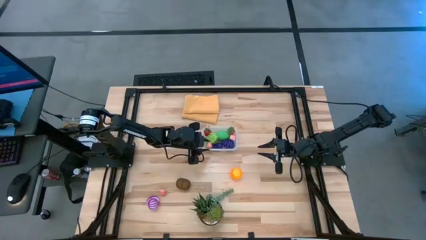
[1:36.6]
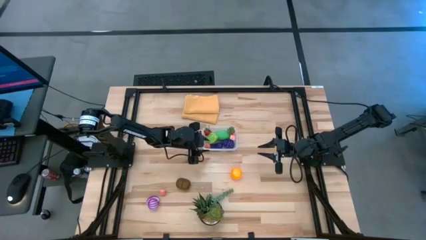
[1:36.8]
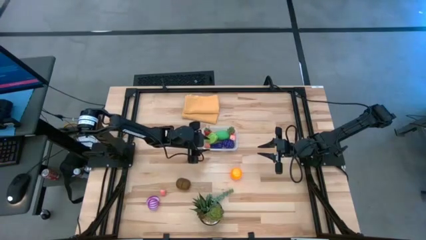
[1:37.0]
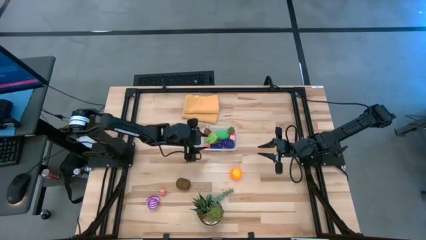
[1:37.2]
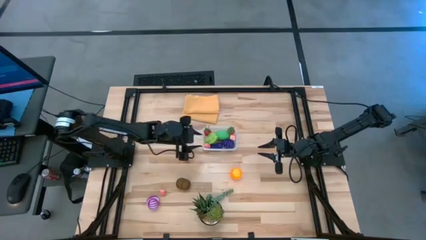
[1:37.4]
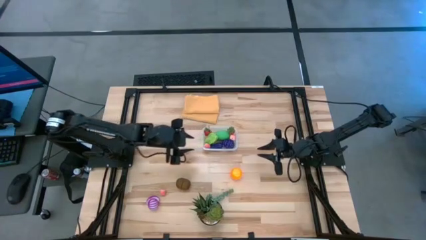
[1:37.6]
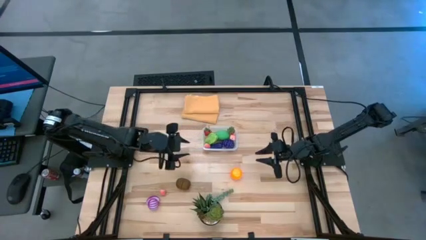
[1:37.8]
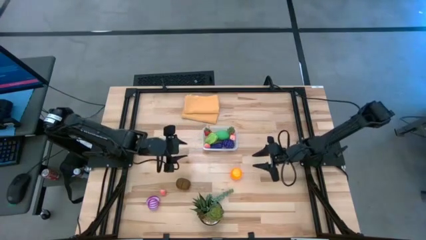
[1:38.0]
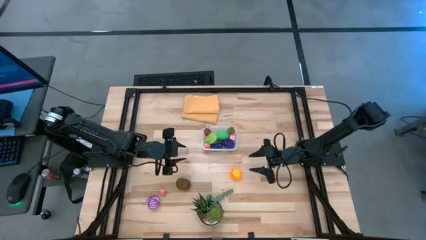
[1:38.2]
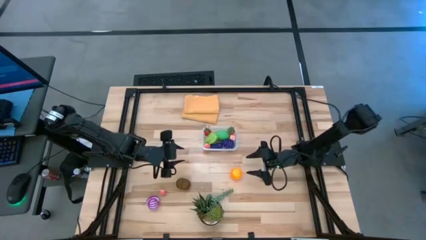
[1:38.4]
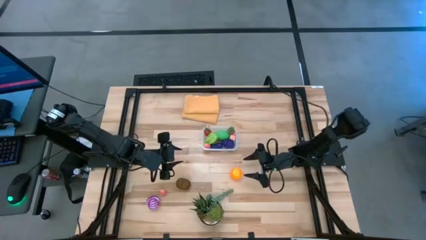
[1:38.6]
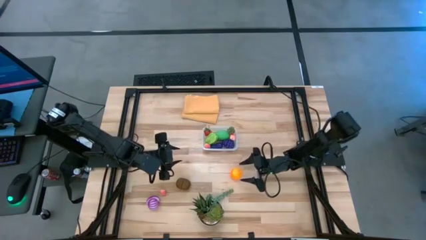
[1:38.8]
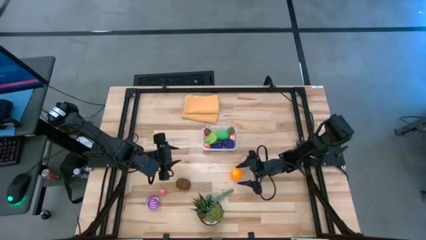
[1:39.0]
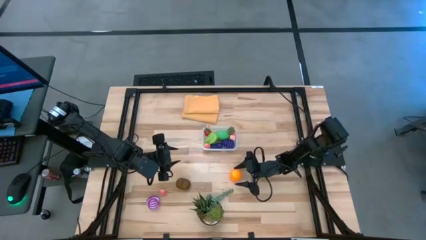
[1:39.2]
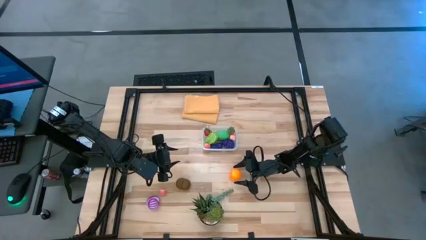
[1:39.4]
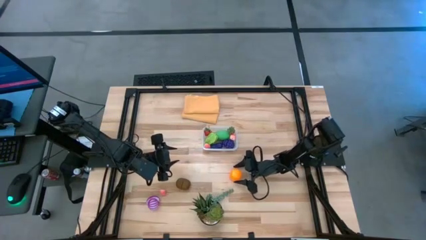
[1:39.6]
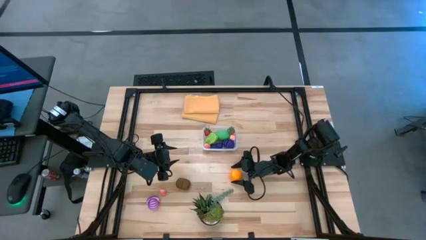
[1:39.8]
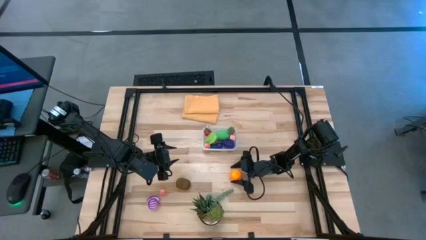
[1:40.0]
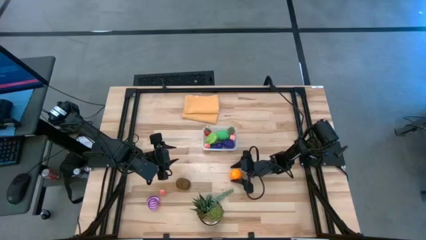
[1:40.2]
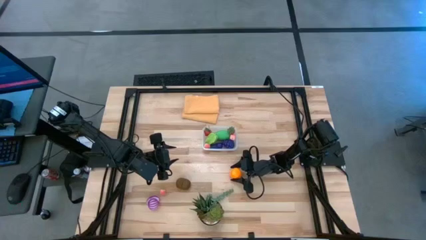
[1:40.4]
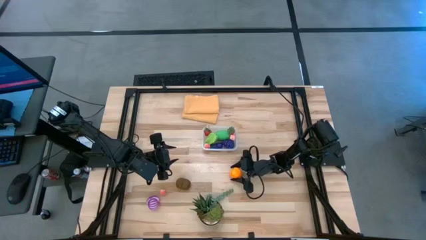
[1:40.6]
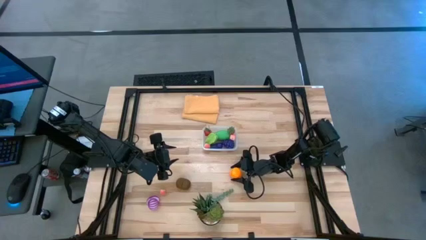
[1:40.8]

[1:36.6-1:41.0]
Task: Pick and placing Produce into tupperware
Put the orange into the transparent container

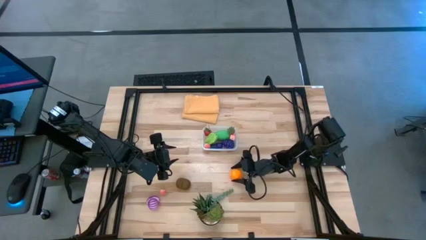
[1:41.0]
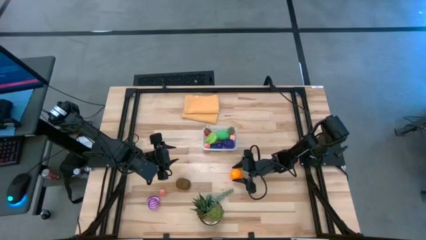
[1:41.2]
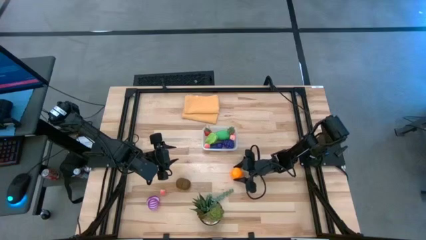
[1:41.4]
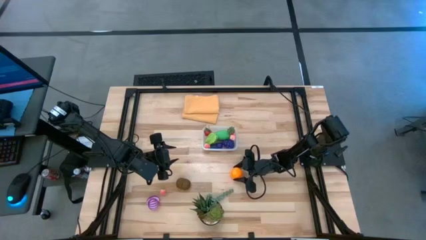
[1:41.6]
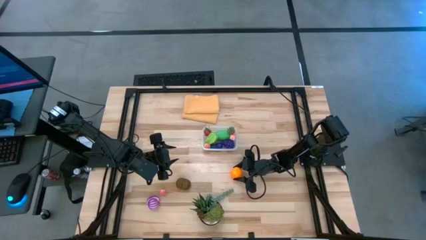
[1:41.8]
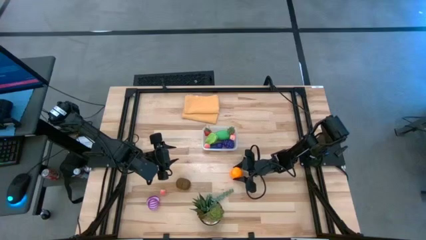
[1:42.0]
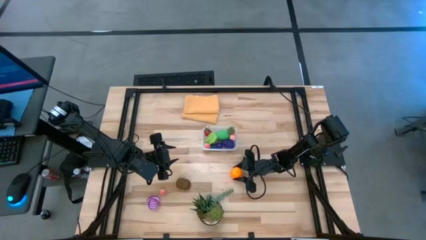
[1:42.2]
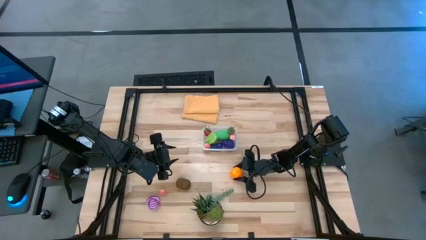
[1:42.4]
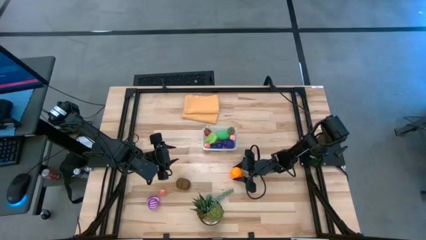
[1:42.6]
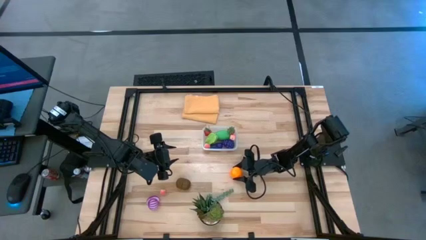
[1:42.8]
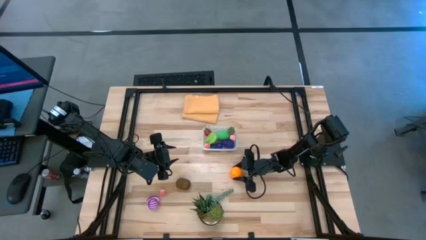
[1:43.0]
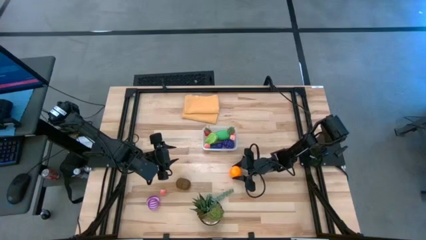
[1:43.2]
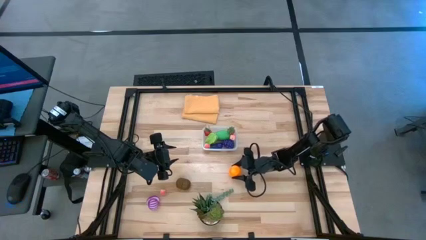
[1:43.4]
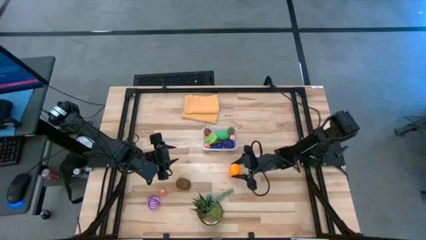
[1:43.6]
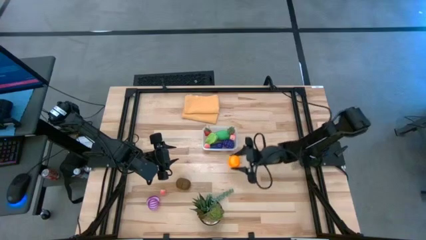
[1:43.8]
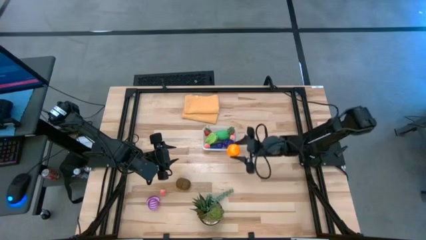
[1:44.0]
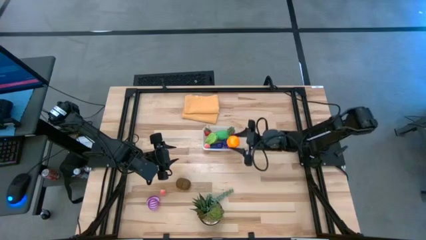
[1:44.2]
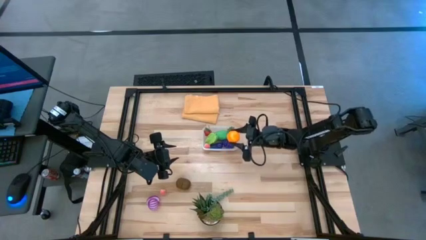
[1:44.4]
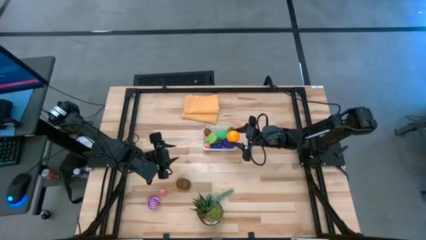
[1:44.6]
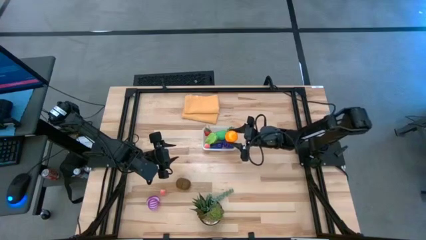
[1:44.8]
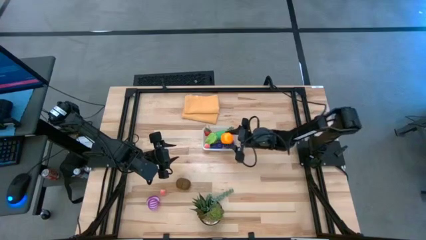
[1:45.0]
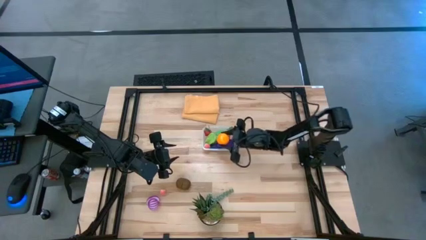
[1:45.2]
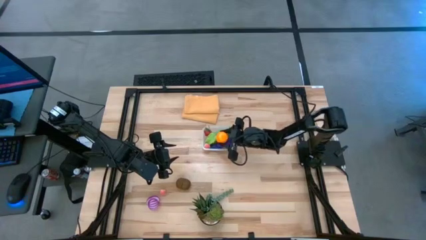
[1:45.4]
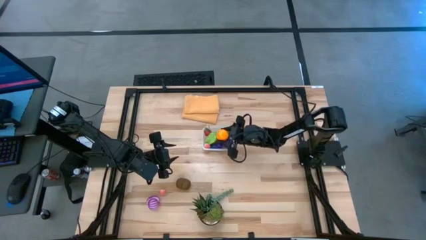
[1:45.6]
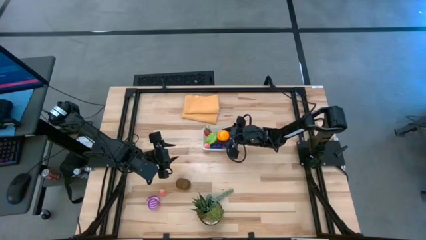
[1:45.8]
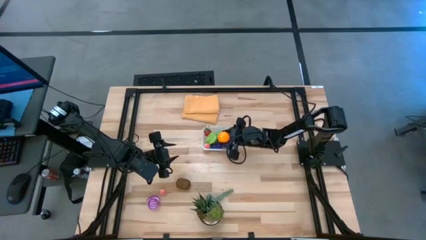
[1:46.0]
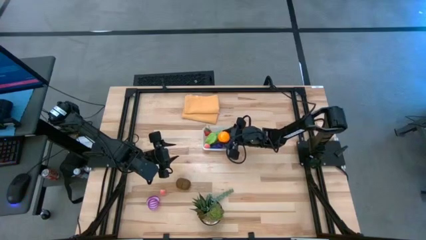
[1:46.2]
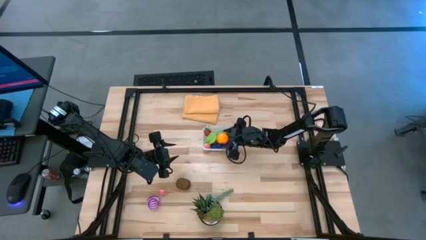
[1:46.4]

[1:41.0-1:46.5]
Put the orange into the transparent container

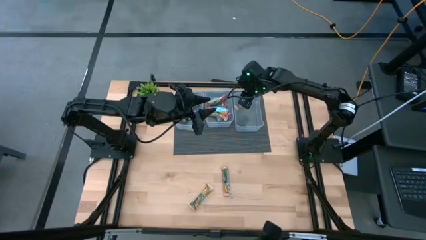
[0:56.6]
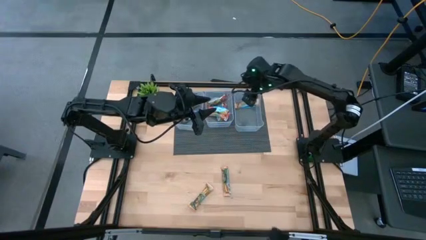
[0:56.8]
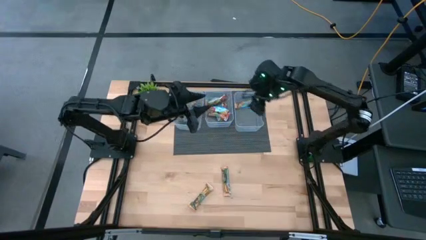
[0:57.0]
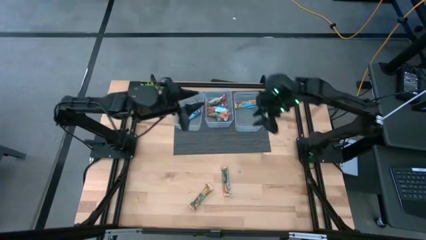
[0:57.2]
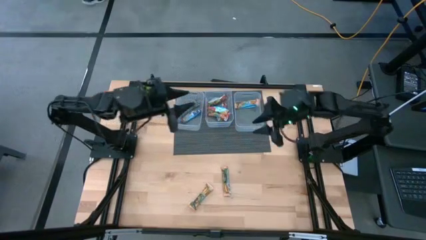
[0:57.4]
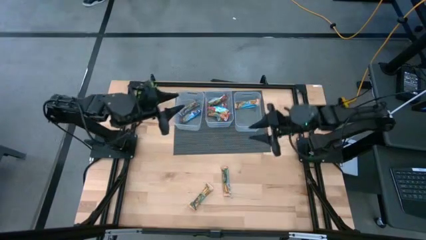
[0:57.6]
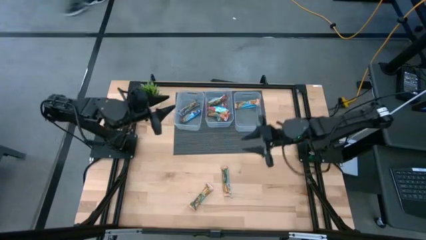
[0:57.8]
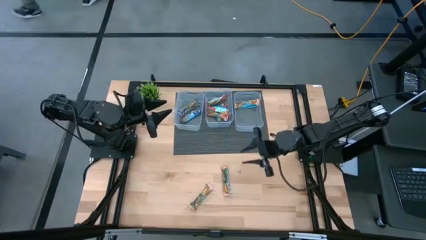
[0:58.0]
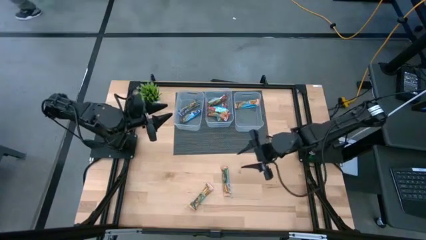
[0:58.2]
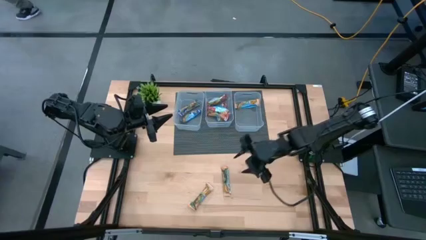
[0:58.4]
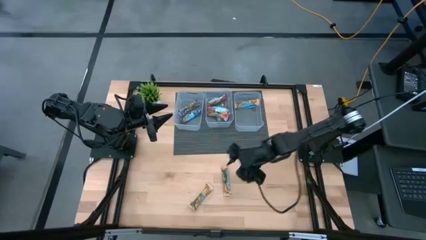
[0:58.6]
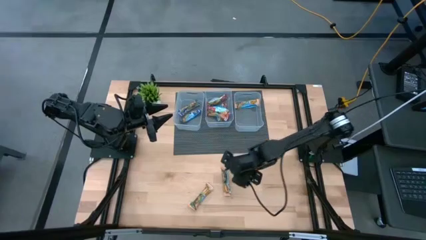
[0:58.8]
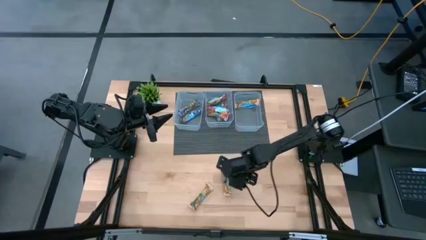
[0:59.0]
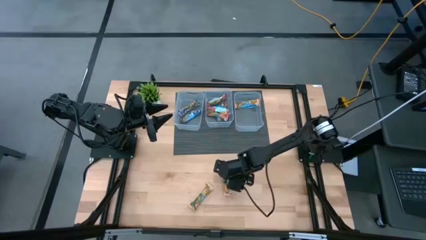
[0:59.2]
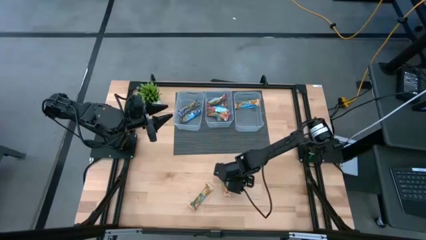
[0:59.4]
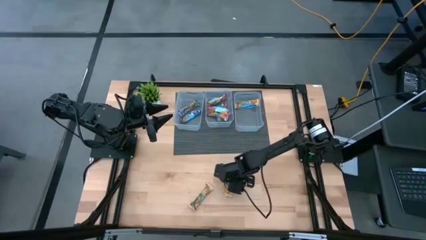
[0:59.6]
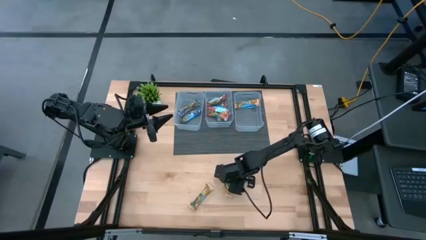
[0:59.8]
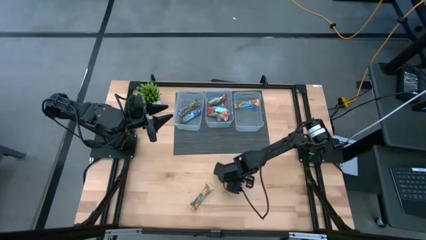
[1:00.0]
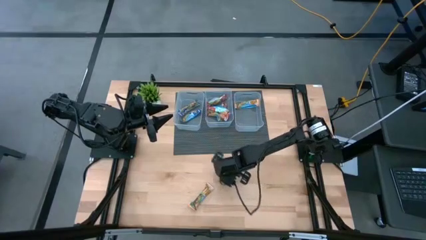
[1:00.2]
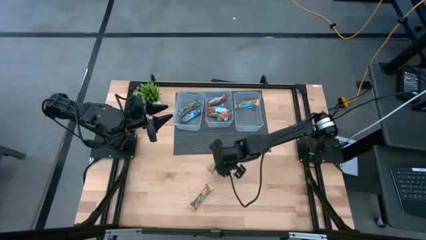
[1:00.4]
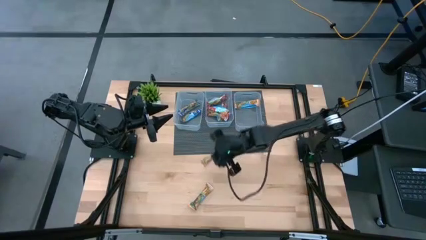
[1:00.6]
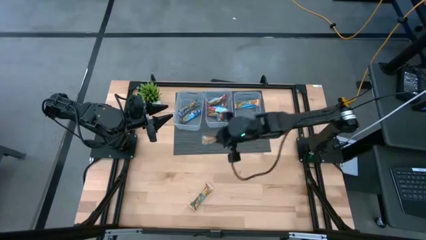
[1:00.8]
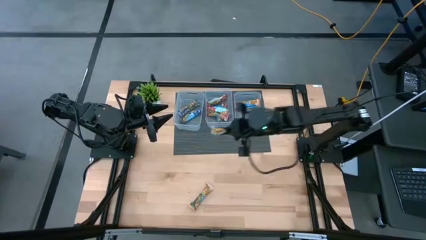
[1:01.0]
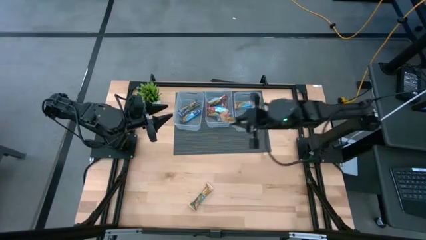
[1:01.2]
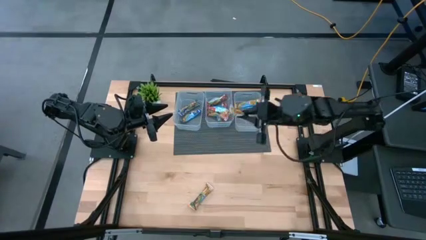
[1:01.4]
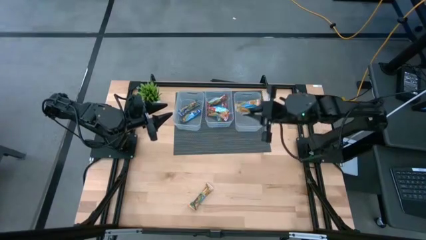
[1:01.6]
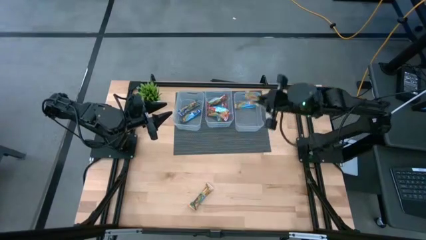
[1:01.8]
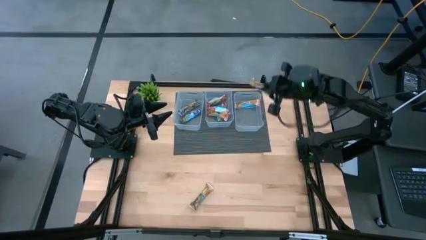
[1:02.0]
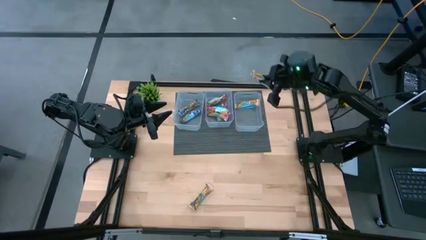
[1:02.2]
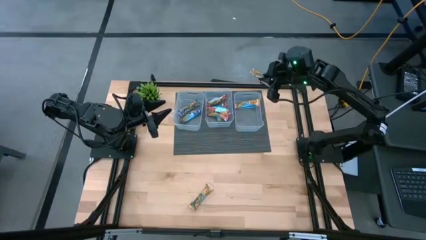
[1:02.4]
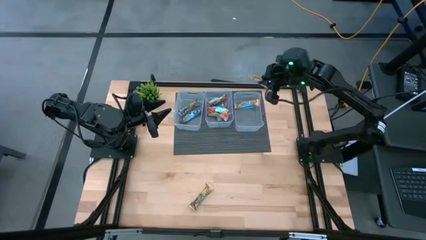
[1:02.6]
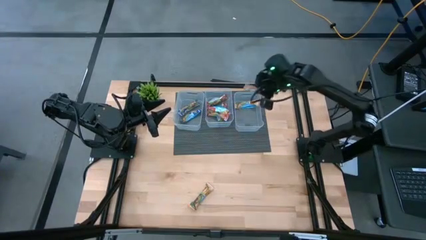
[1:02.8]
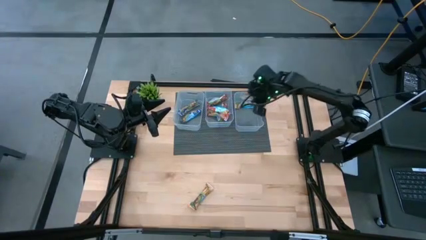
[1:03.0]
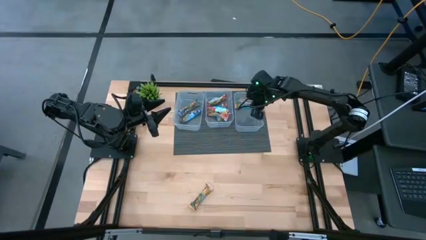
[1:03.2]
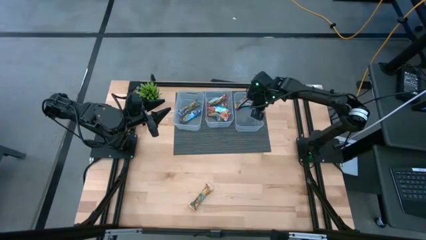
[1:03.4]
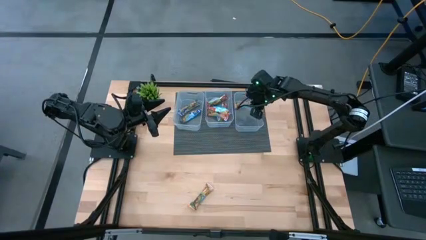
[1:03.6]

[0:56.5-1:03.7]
Task: Pick and place Granola Bars by type
Put the yellow granola bar into the right transparent bin
